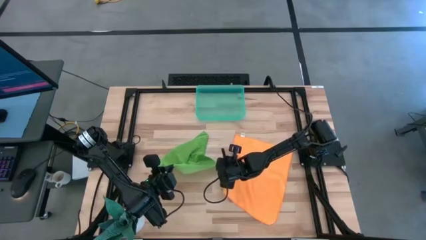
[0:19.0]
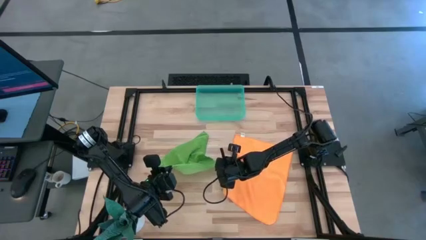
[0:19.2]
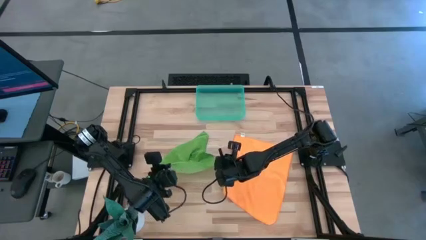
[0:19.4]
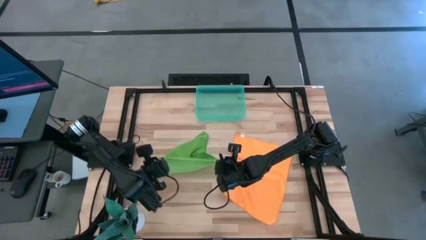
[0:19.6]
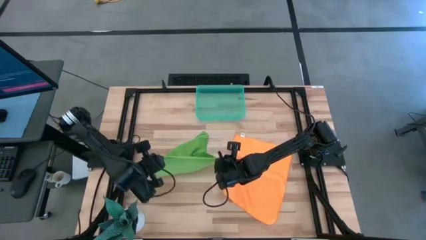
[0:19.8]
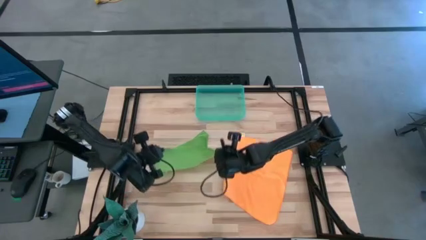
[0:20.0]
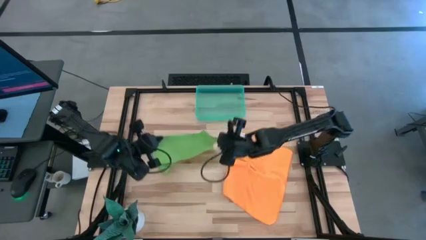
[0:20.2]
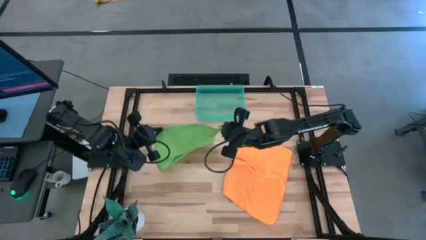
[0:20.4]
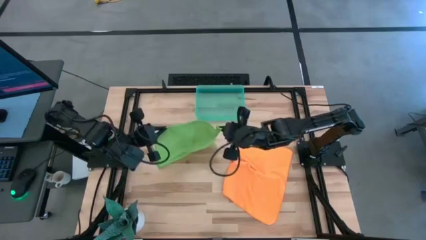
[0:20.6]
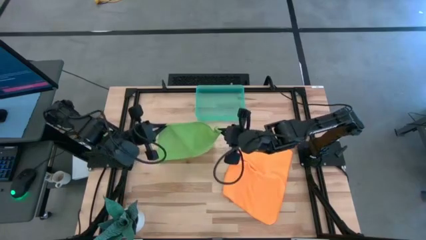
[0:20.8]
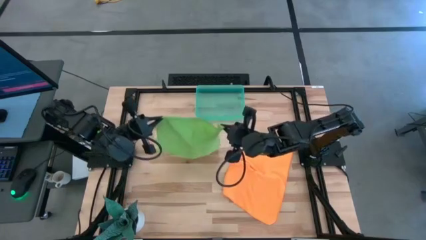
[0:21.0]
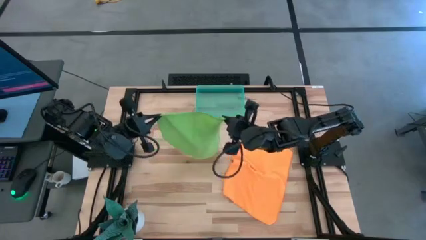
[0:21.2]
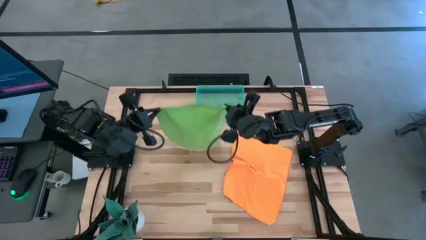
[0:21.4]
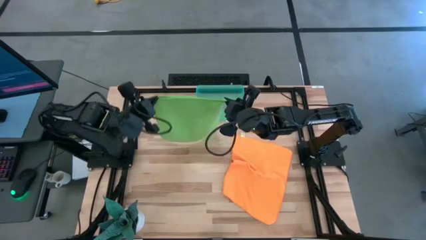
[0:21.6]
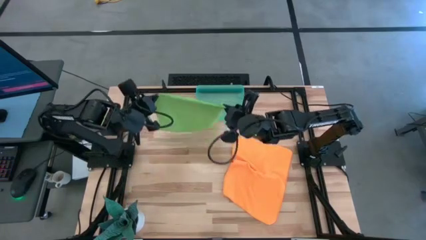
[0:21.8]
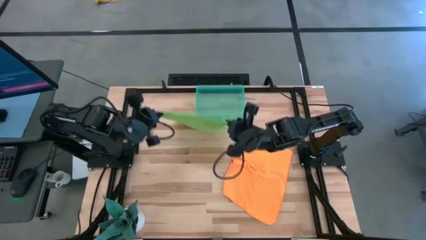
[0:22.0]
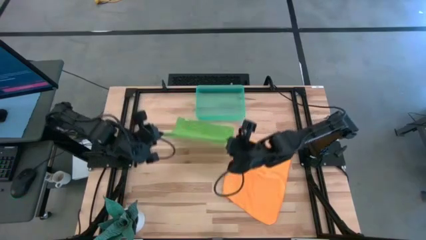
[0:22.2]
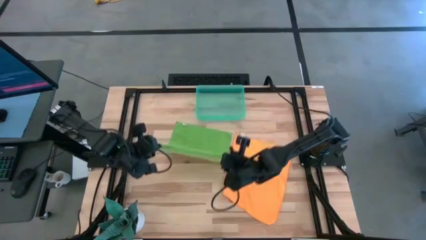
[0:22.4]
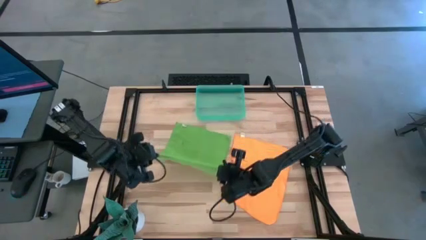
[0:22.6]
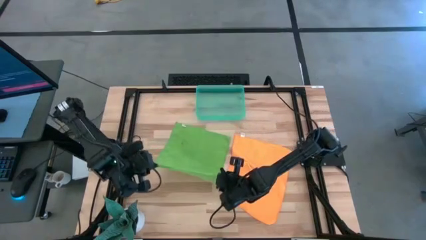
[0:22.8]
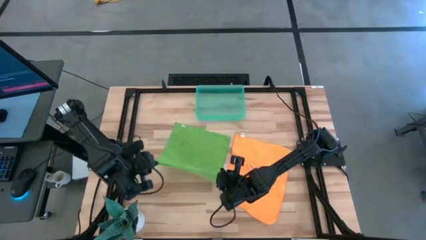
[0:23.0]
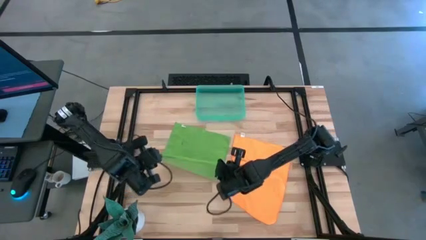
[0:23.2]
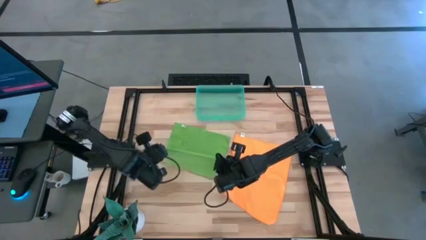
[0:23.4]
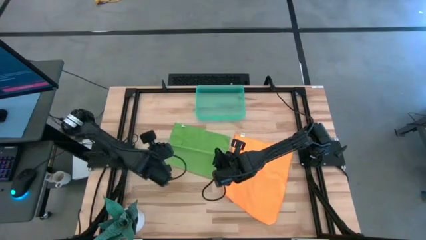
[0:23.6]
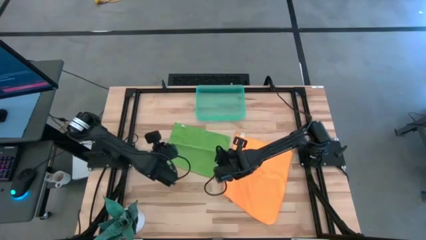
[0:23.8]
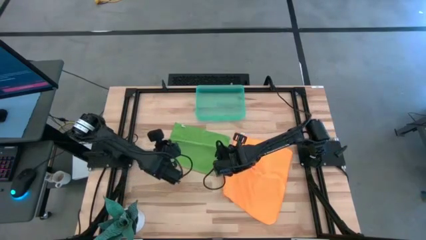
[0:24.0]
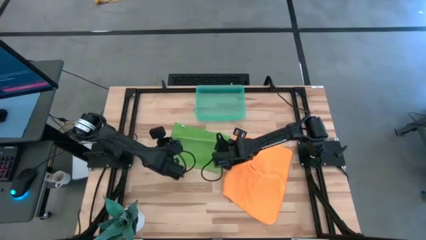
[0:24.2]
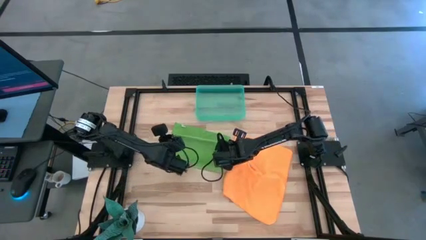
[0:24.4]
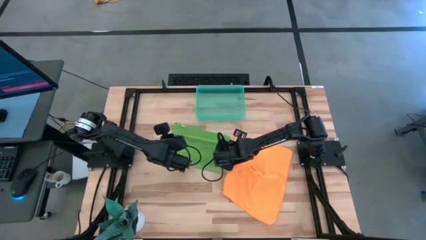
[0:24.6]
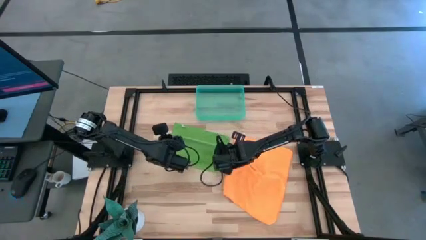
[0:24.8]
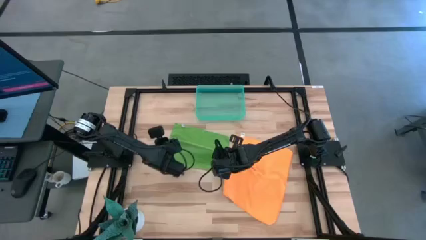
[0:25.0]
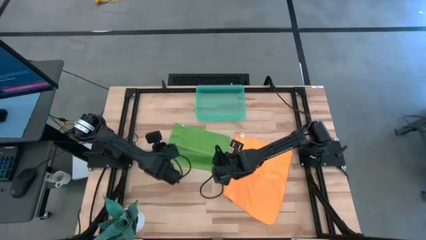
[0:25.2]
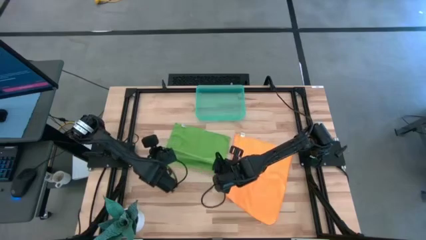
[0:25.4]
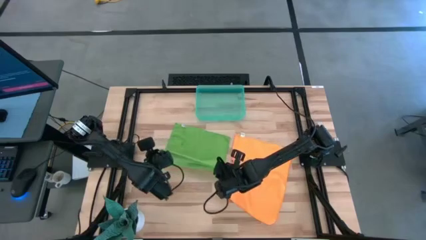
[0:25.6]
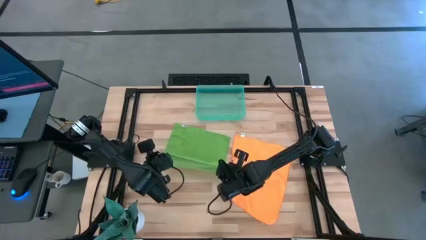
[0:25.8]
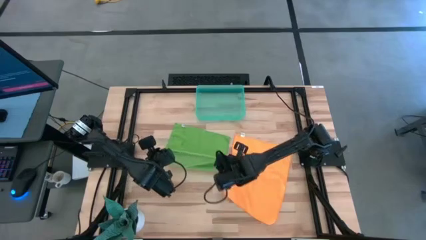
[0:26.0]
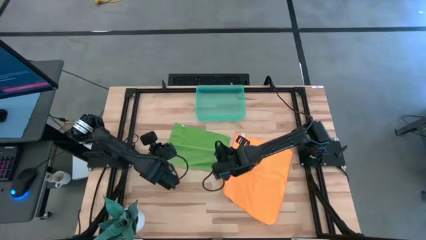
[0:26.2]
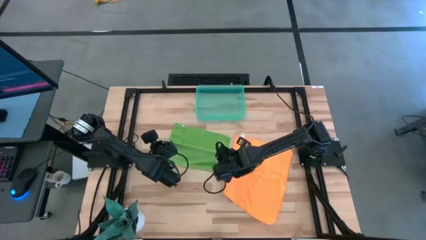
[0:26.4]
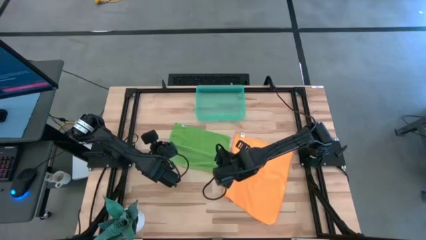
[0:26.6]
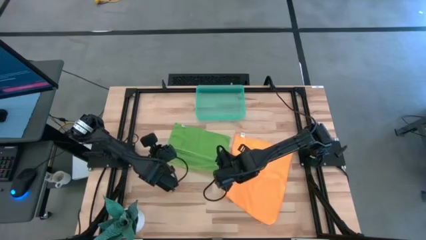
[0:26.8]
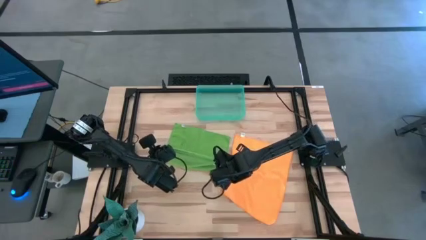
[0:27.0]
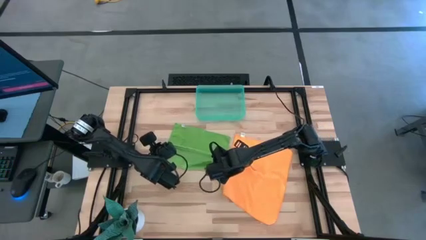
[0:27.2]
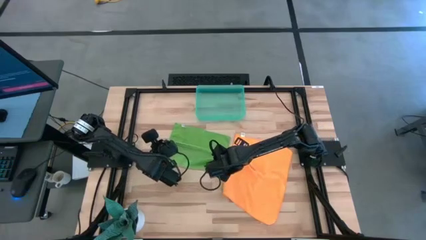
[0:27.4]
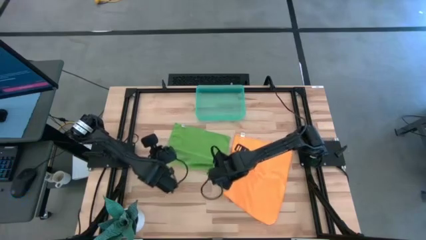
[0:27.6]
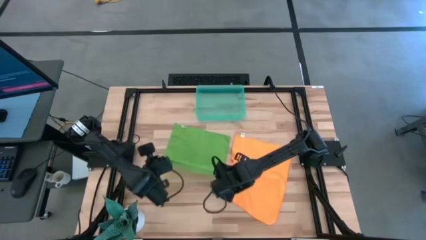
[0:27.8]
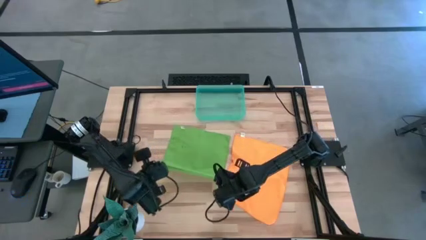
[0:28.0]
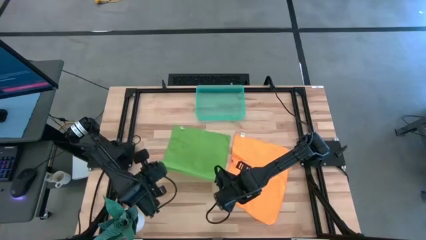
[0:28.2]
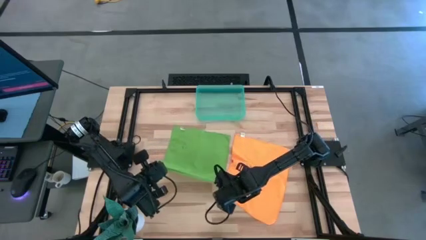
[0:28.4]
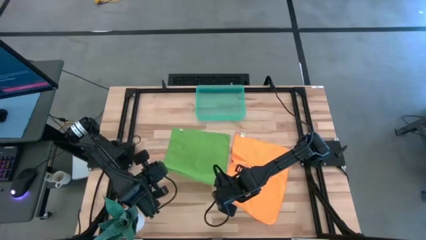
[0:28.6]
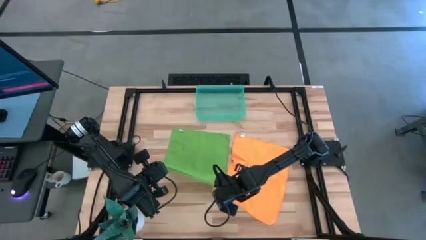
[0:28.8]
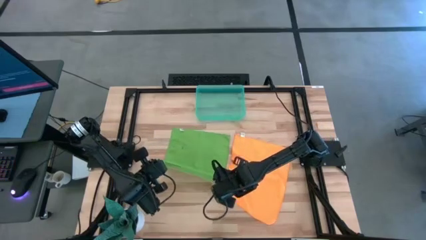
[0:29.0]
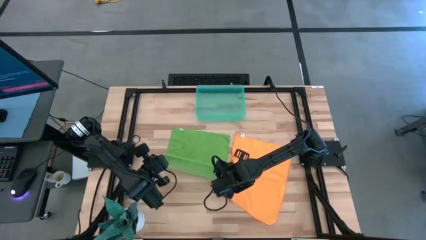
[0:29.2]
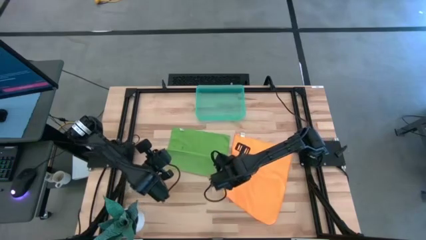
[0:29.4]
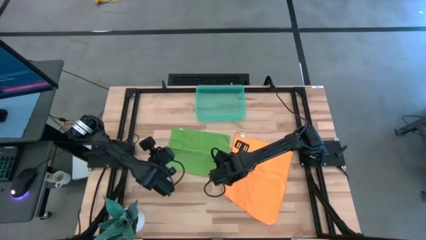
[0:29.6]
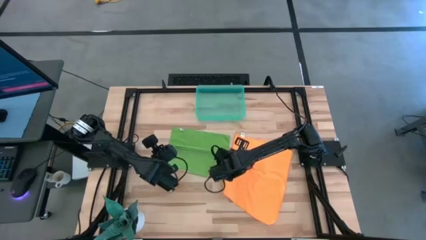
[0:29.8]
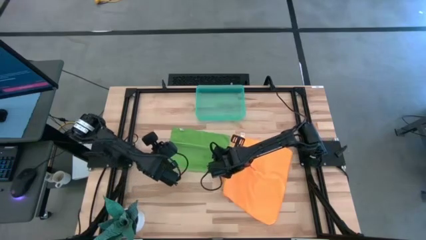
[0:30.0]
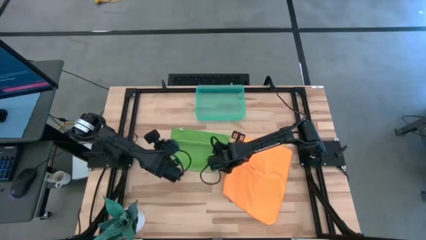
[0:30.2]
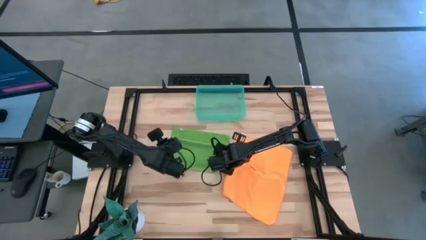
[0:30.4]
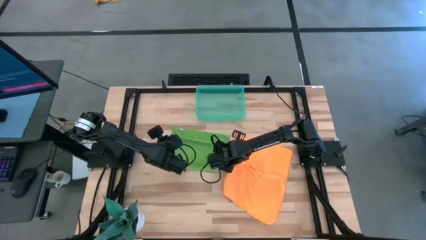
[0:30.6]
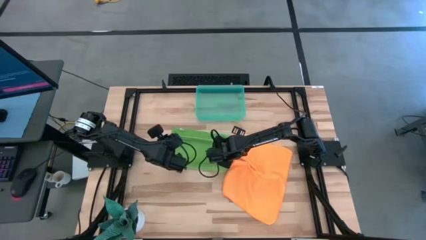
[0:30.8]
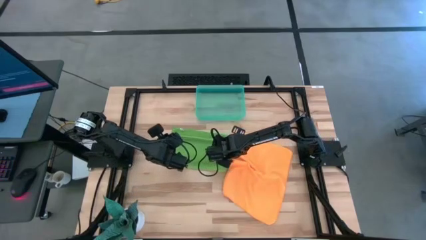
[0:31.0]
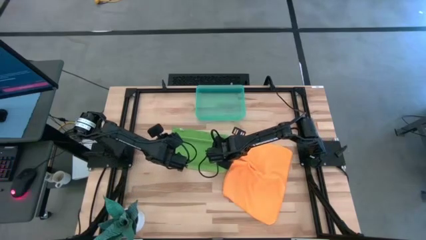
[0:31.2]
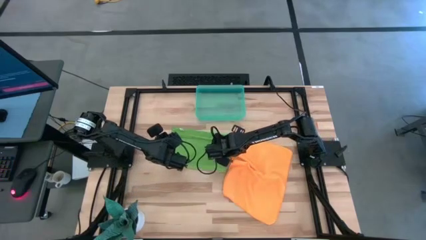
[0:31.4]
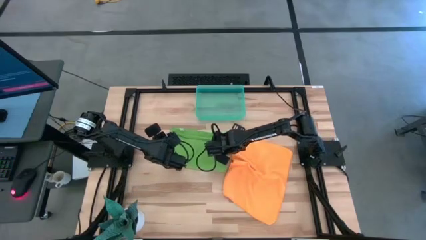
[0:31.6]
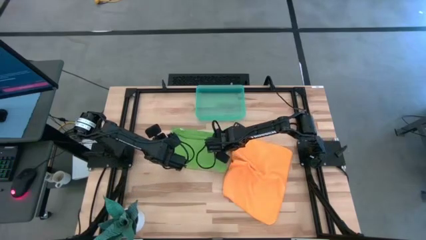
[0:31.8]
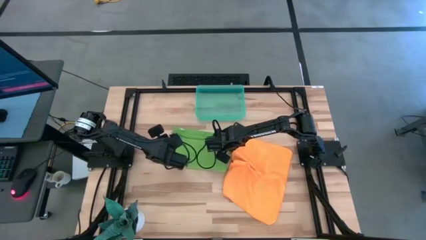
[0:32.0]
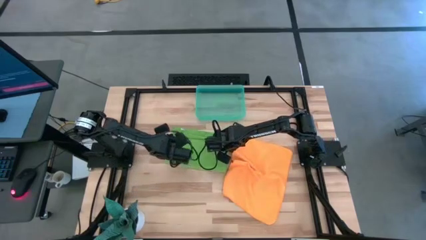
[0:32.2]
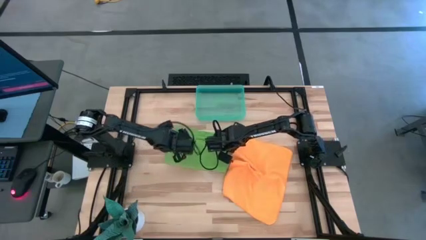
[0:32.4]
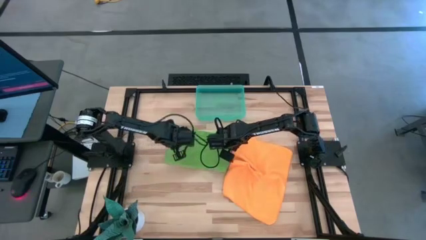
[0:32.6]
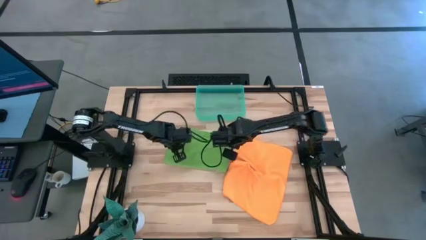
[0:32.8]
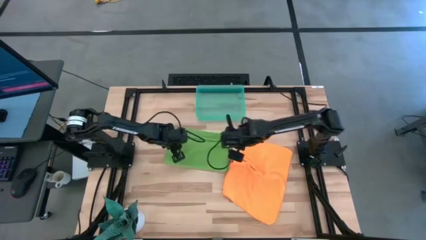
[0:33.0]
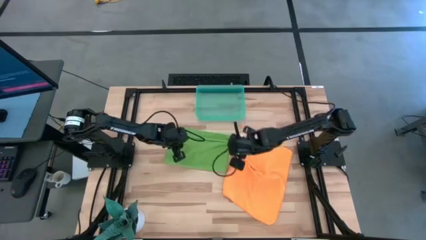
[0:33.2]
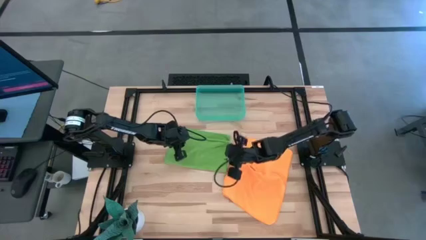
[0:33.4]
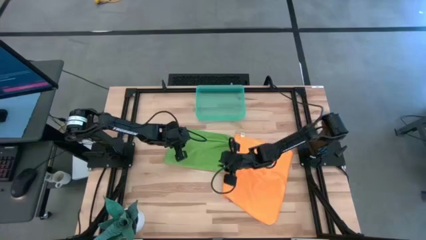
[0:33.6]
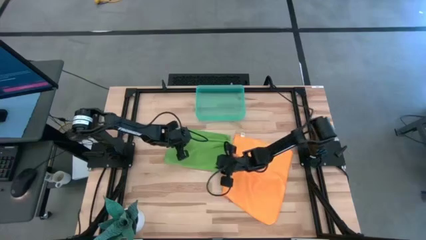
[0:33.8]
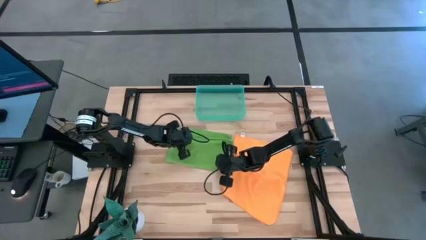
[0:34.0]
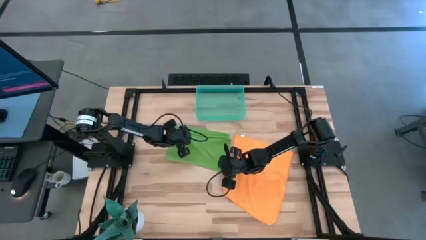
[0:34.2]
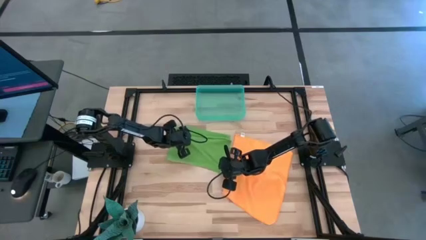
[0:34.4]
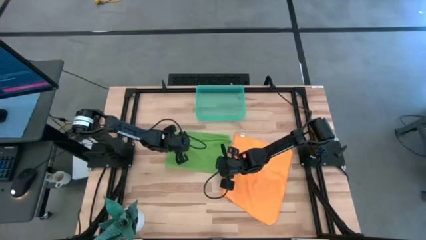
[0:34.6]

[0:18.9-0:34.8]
Task: Roll microfiber towels into tight, uniform cylinder then place into a basket
Fold the green microfiber towel
